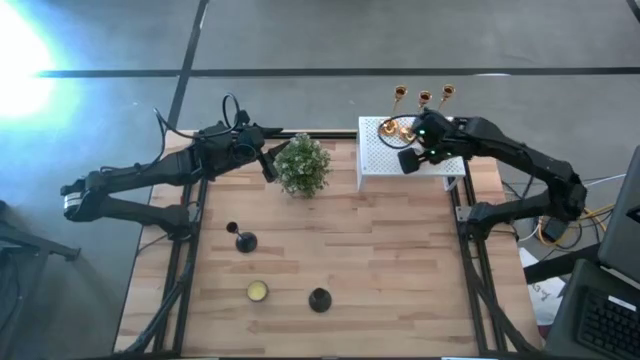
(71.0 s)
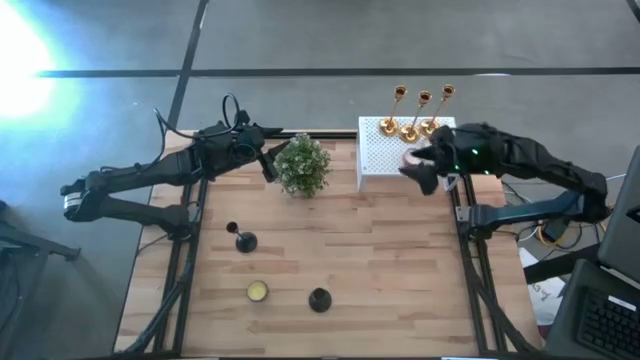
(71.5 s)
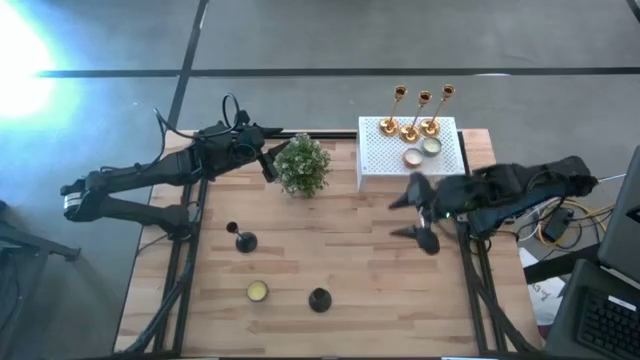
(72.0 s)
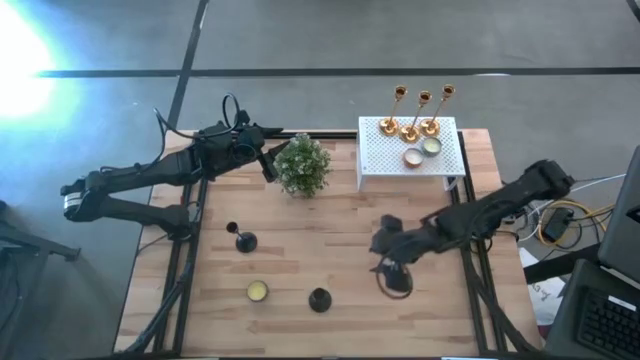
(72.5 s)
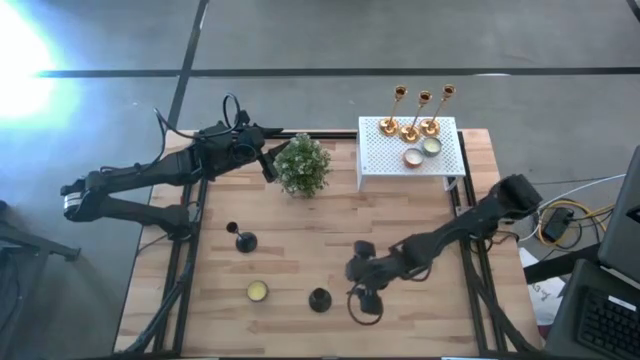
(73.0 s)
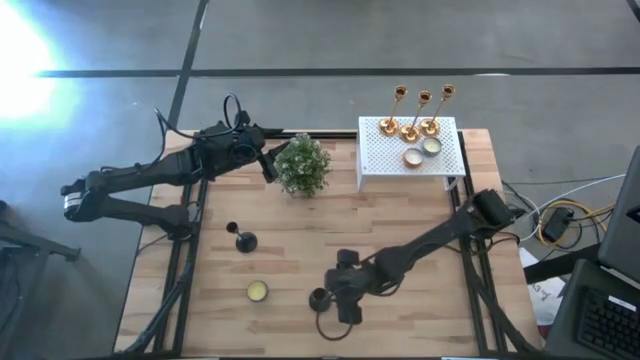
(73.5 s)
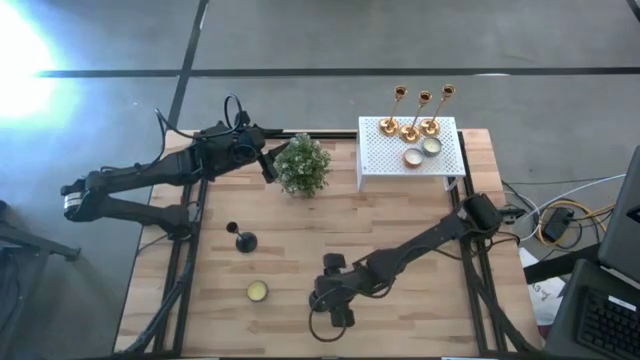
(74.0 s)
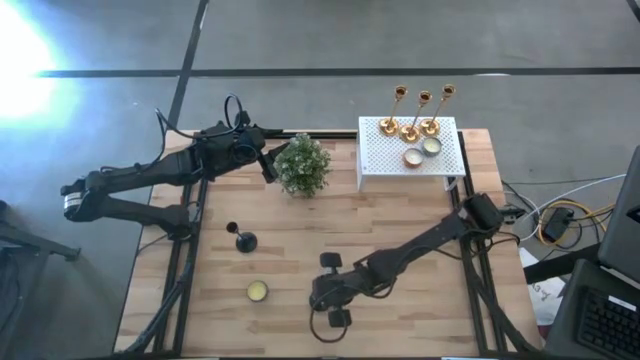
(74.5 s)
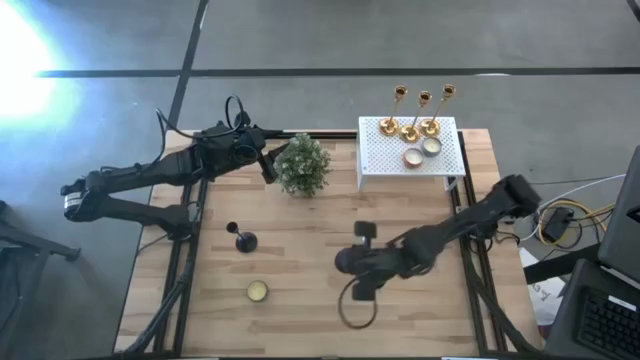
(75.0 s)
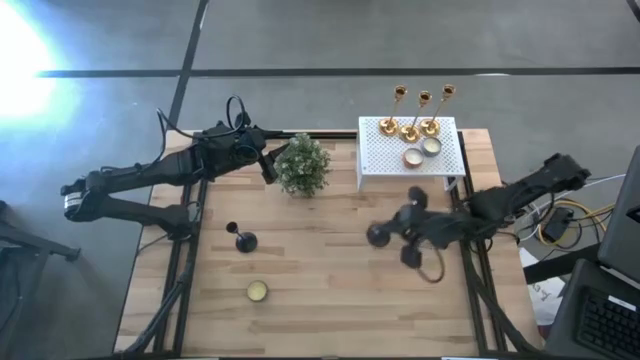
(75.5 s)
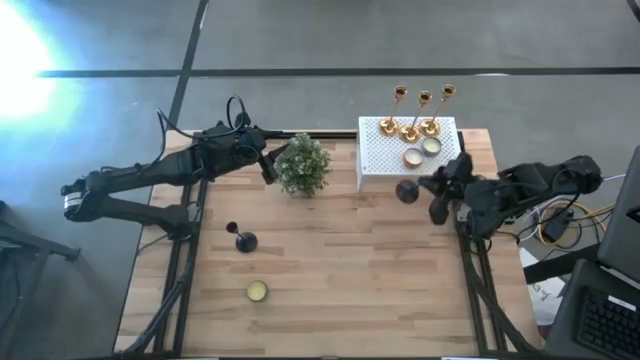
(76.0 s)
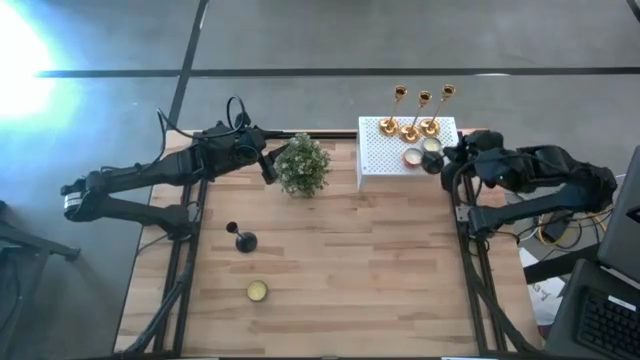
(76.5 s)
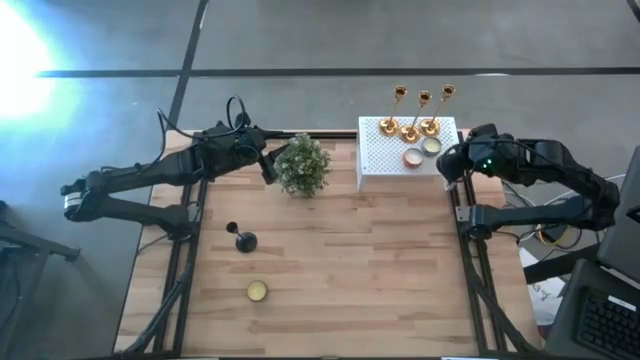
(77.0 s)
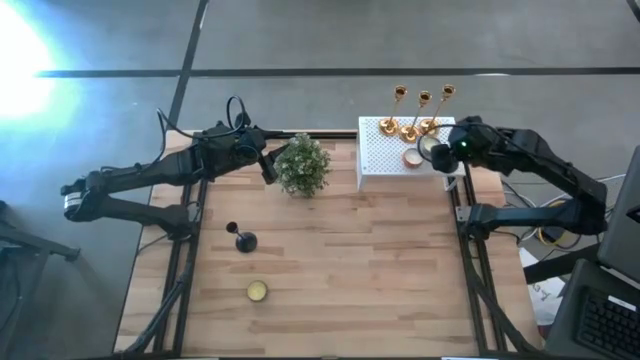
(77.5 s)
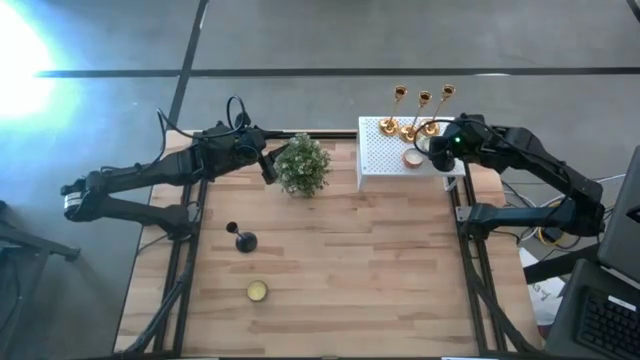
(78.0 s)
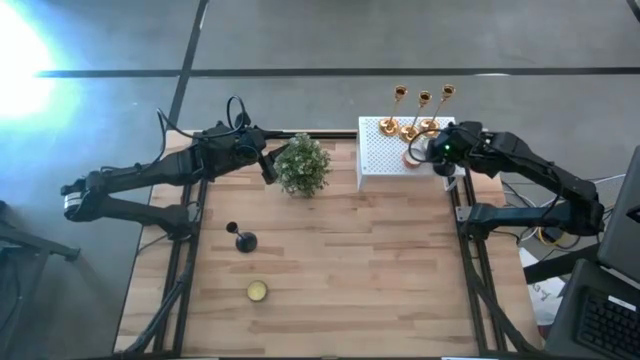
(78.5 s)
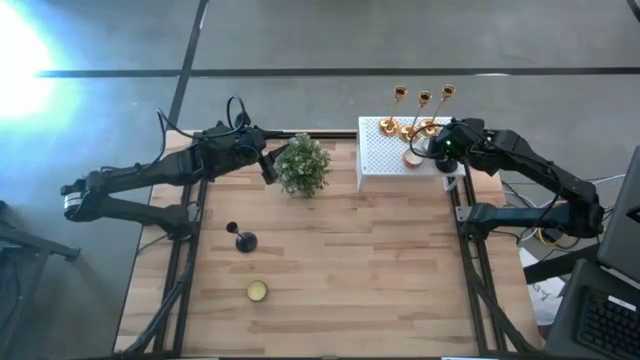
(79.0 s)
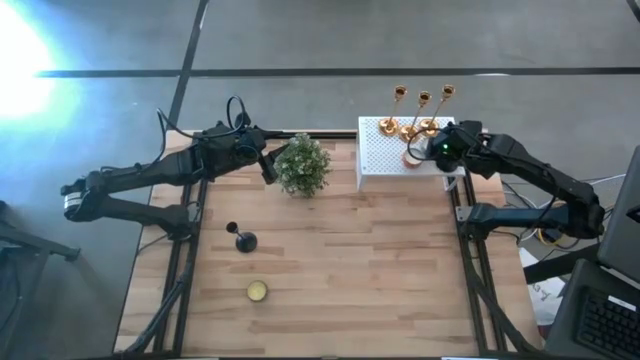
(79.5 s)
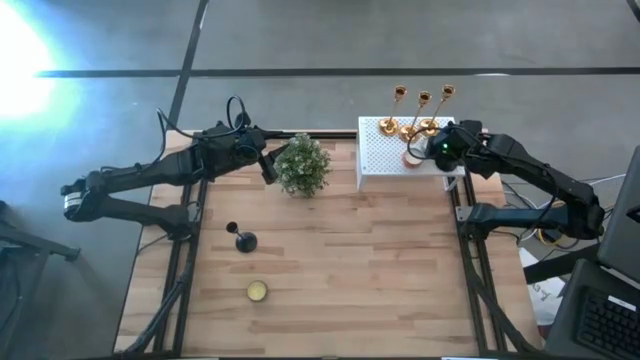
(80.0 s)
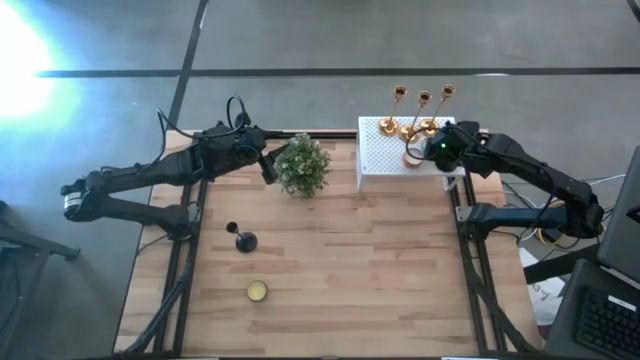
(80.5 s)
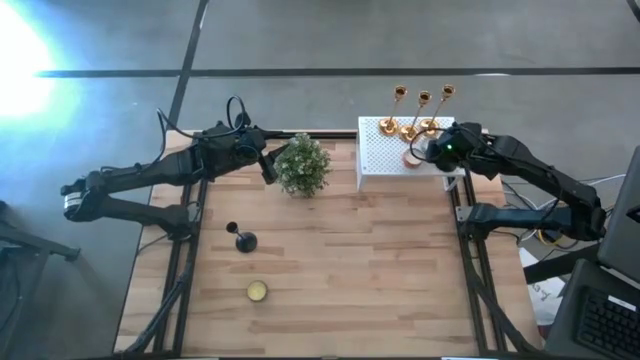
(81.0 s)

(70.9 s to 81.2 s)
Task: Pick & Place candle stick holders
Put the bottom black candle holder on the shelf

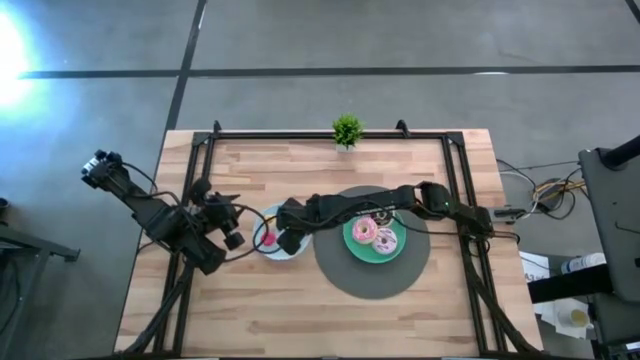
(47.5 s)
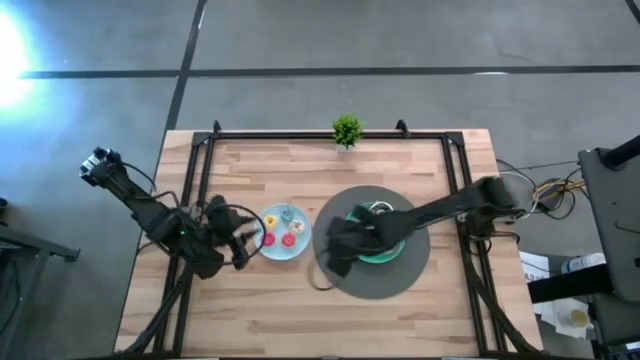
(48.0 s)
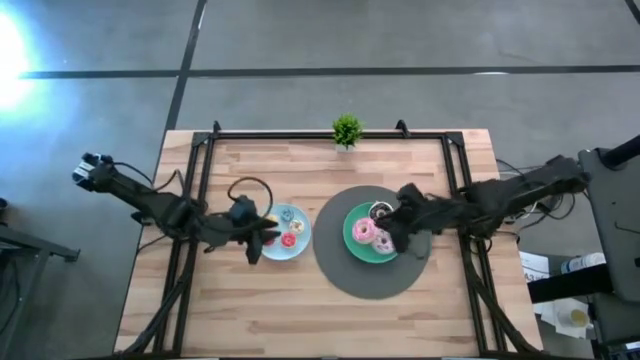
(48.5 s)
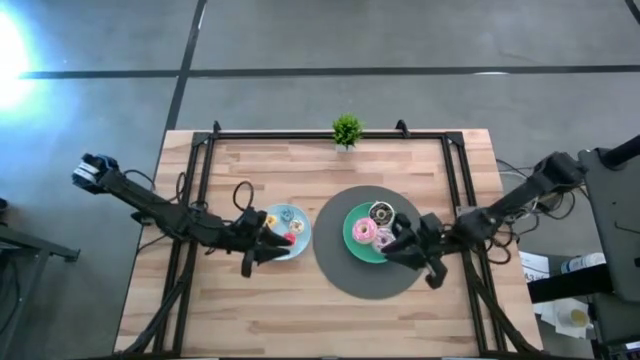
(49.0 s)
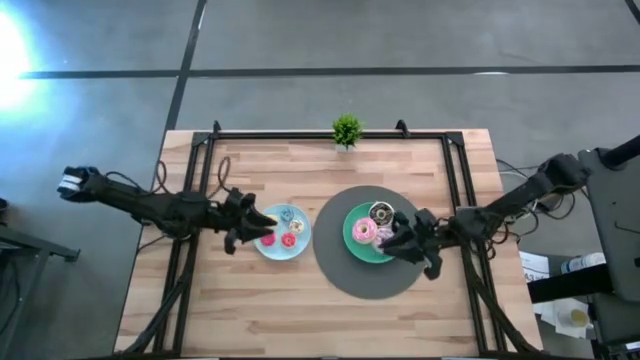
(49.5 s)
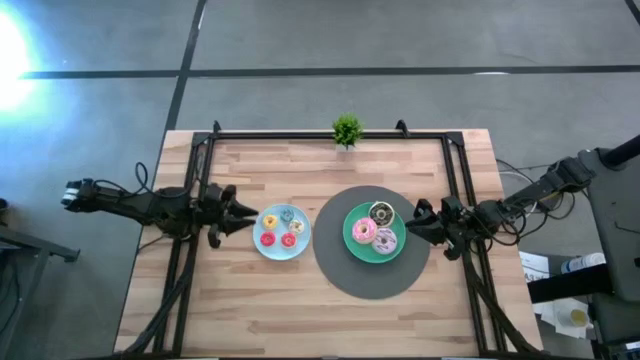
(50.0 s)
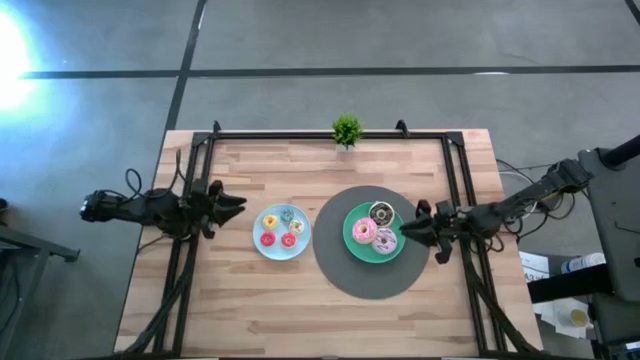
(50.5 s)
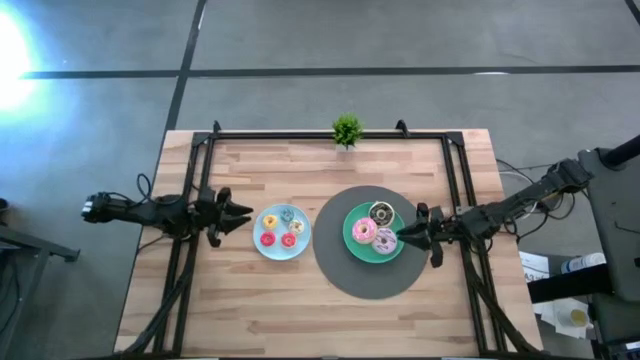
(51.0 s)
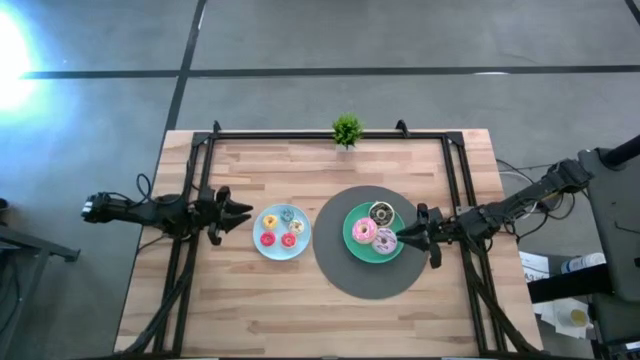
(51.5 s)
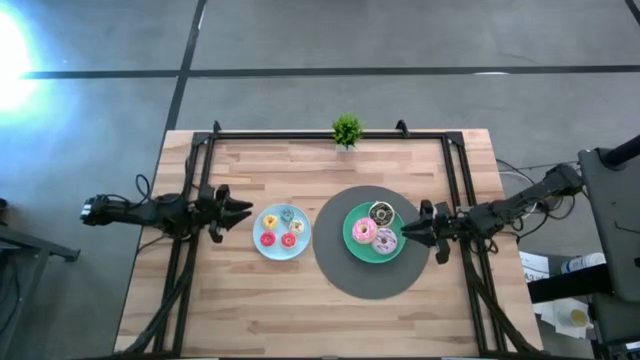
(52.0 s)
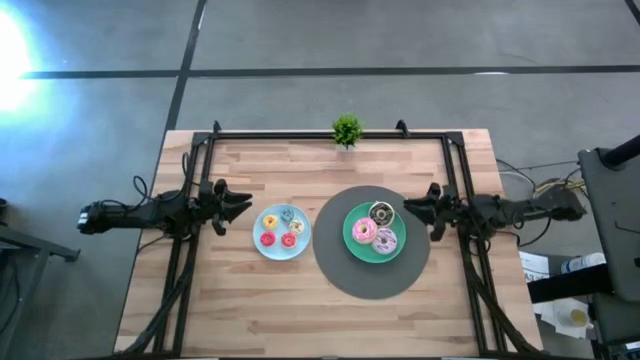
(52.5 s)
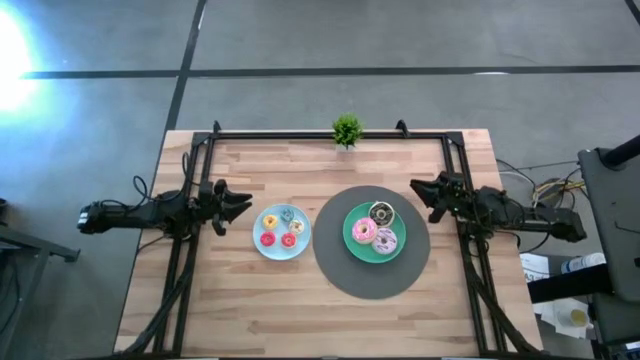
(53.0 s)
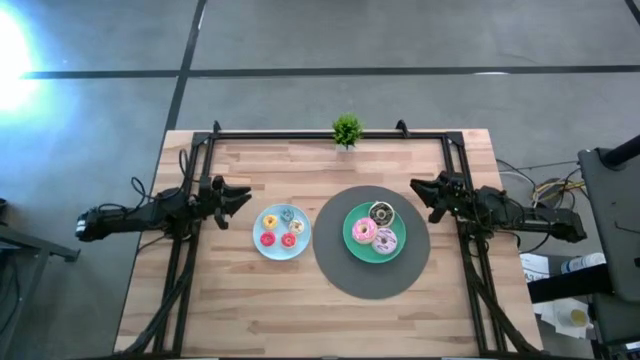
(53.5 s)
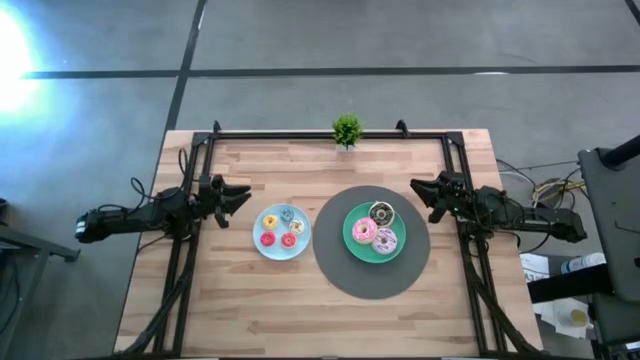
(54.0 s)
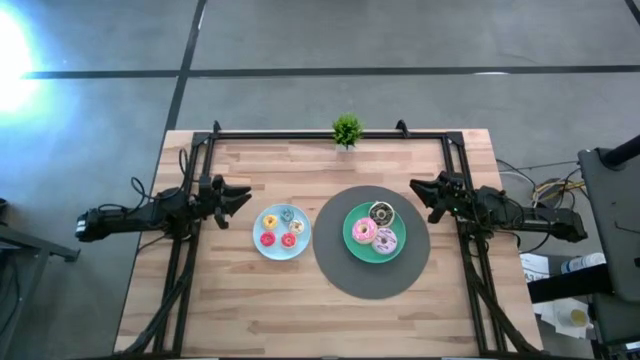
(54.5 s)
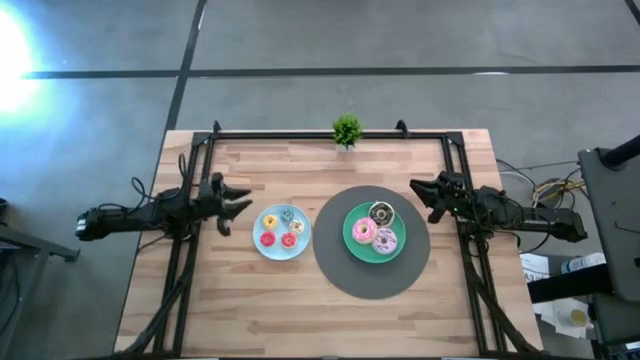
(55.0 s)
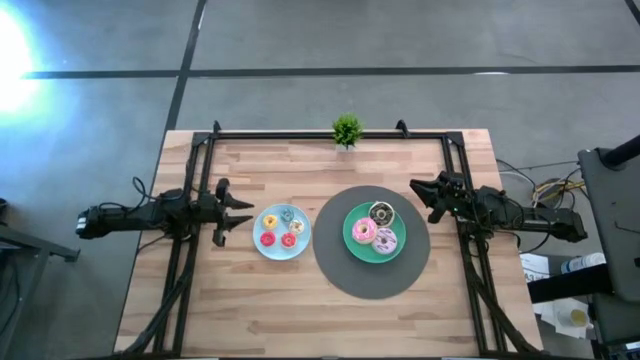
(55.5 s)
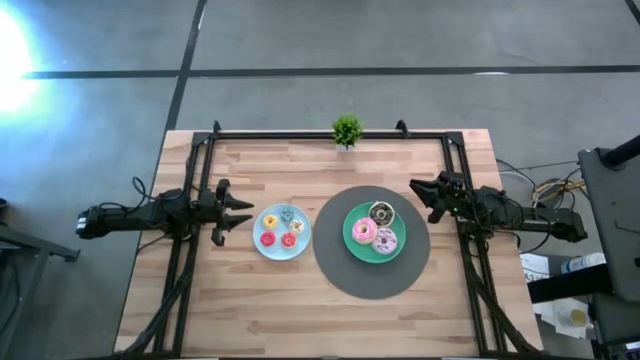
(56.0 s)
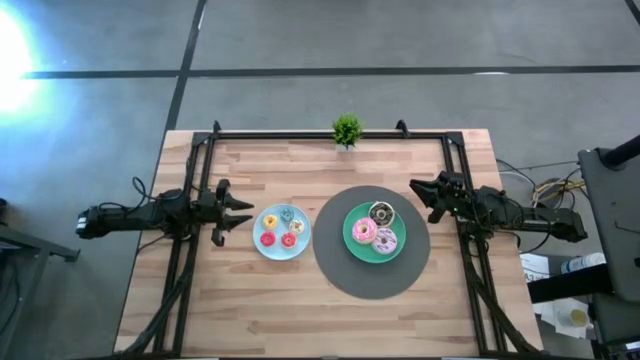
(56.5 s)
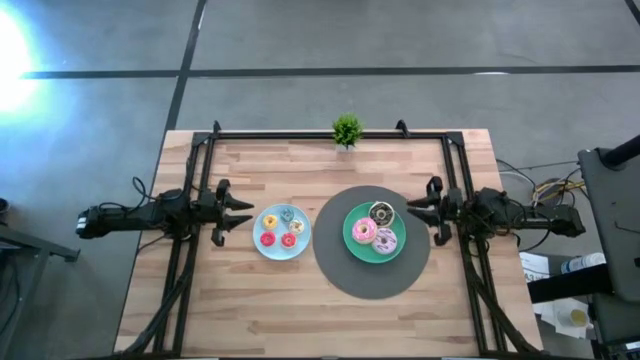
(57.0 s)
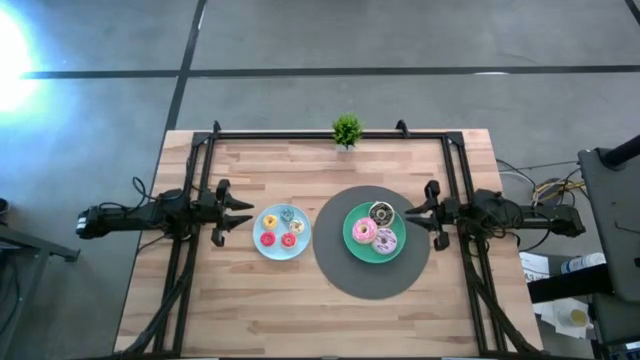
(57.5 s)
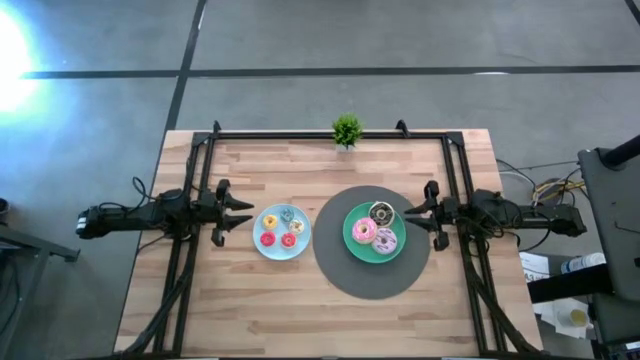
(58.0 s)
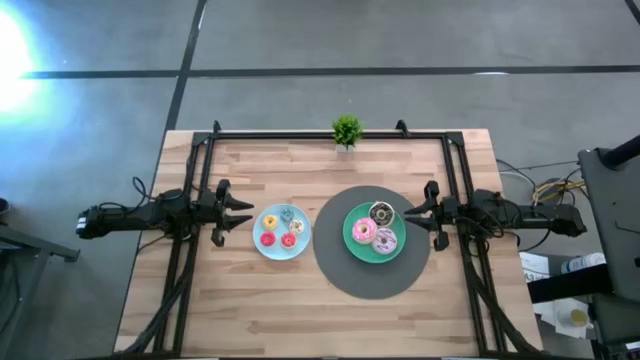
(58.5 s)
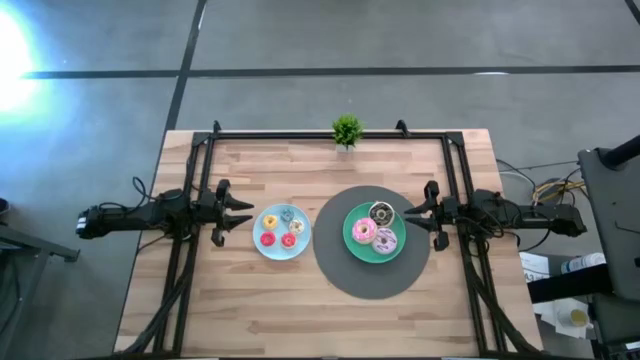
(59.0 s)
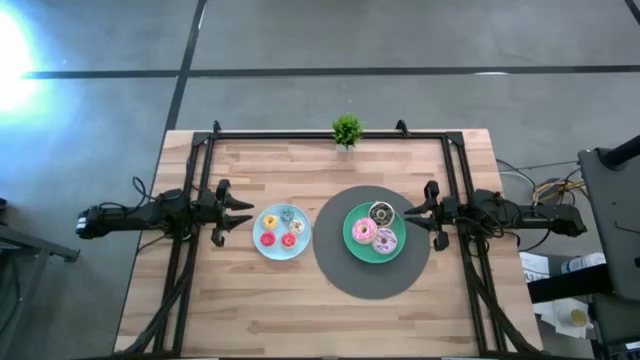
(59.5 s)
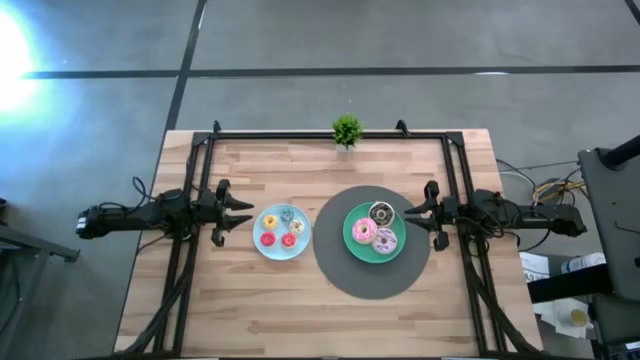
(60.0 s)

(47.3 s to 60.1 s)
Task: Pick & Place donuts
Return to Home Position
